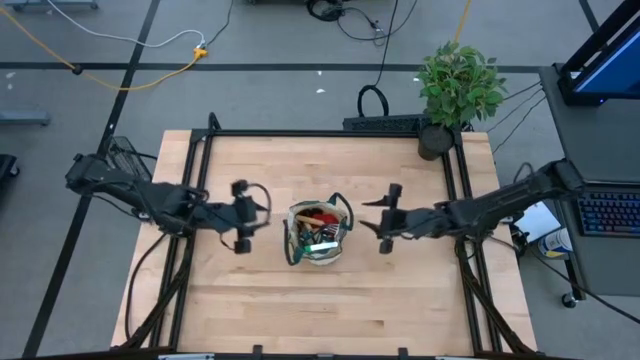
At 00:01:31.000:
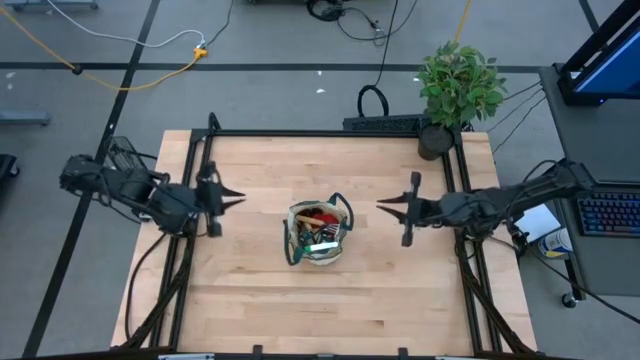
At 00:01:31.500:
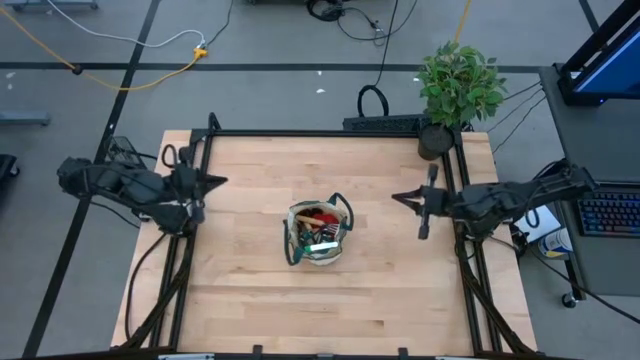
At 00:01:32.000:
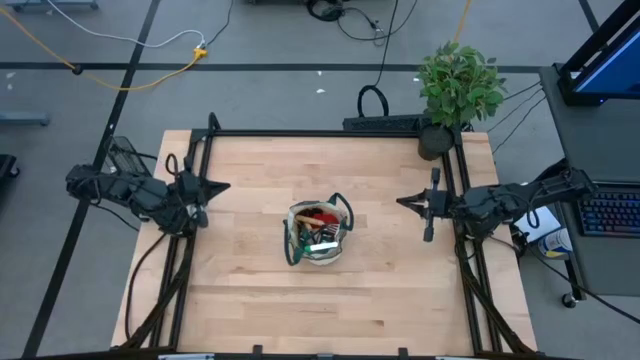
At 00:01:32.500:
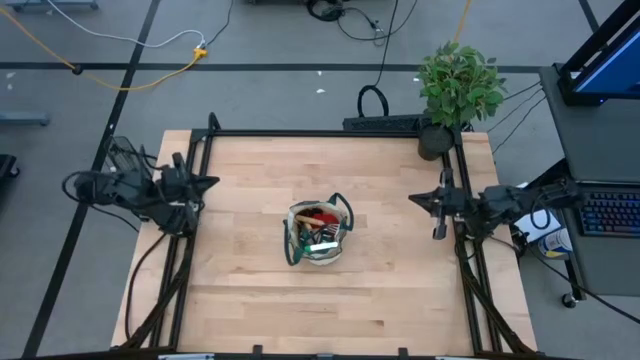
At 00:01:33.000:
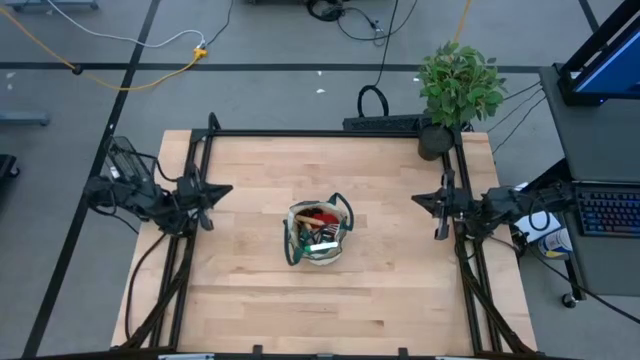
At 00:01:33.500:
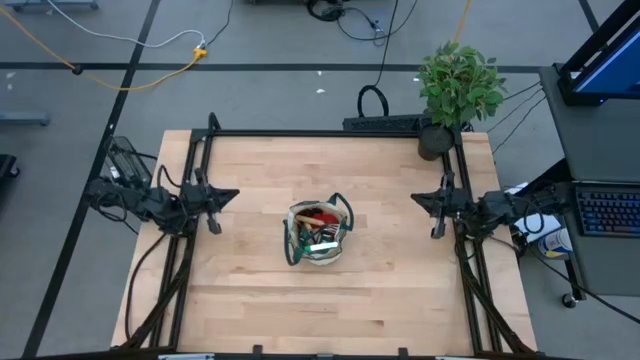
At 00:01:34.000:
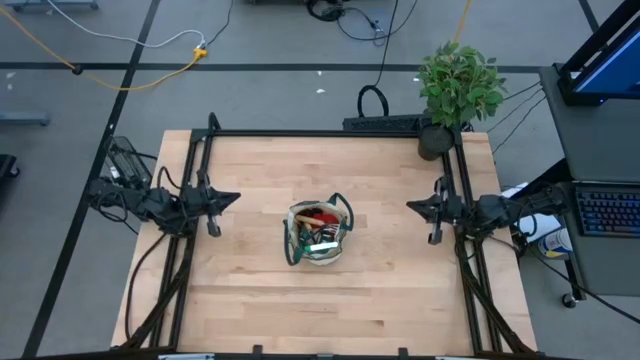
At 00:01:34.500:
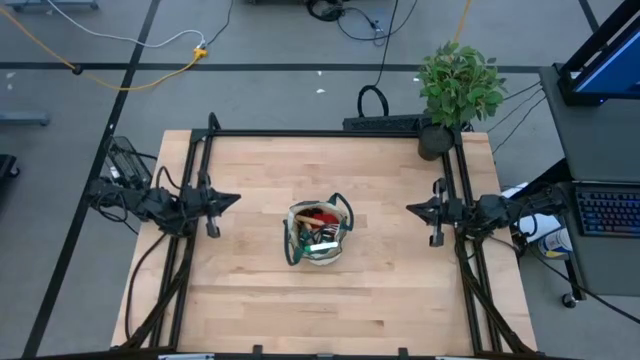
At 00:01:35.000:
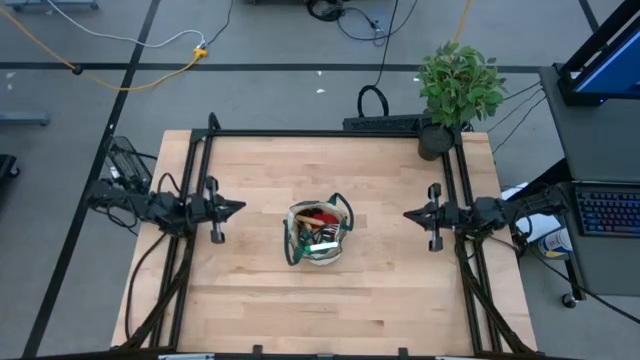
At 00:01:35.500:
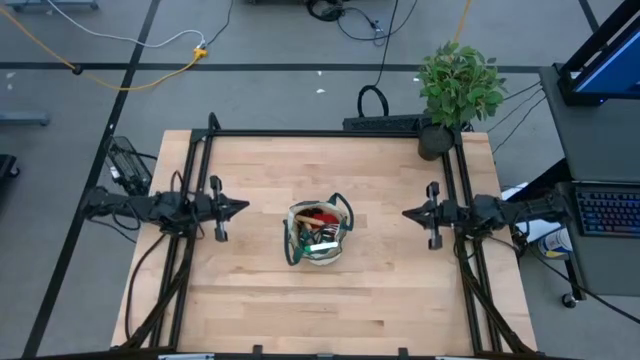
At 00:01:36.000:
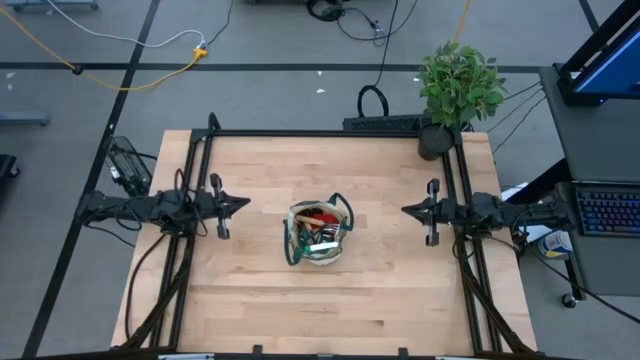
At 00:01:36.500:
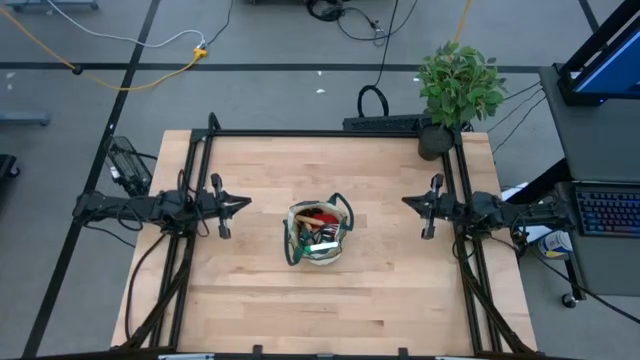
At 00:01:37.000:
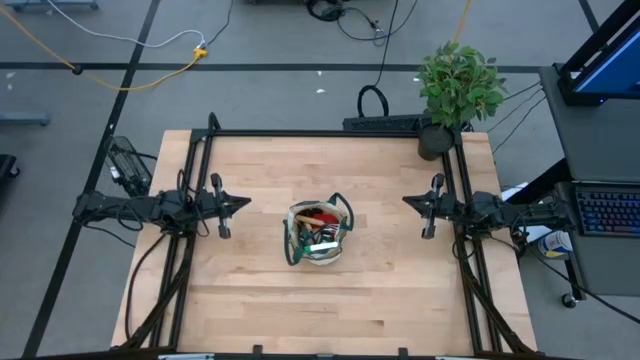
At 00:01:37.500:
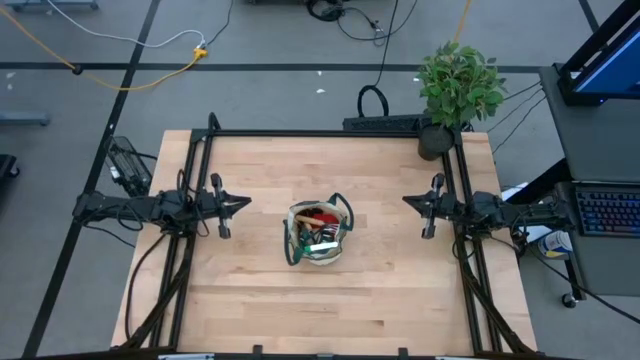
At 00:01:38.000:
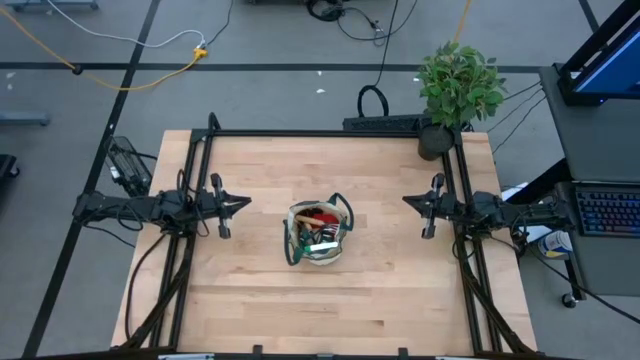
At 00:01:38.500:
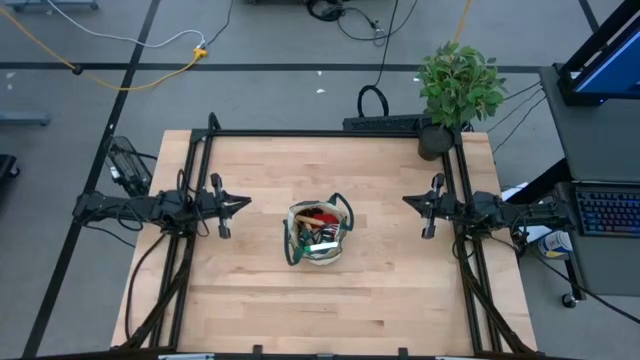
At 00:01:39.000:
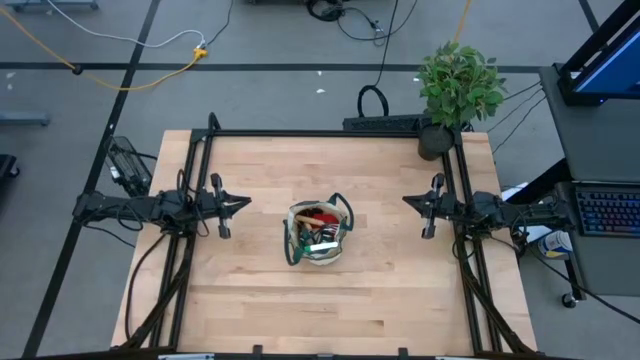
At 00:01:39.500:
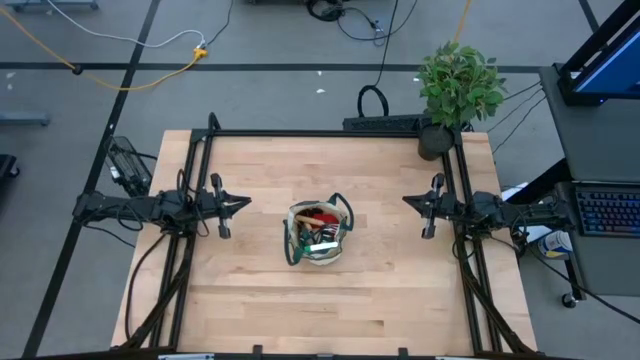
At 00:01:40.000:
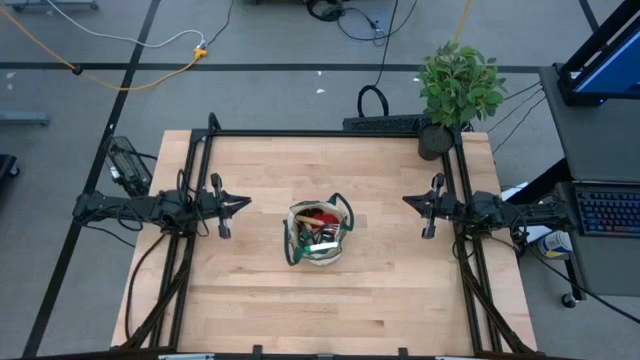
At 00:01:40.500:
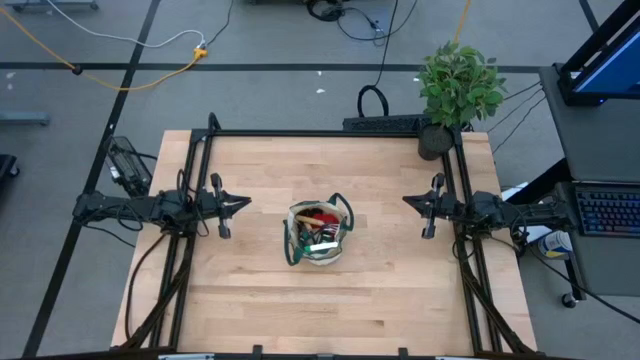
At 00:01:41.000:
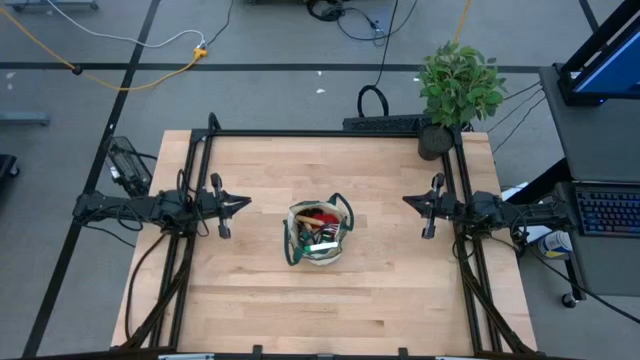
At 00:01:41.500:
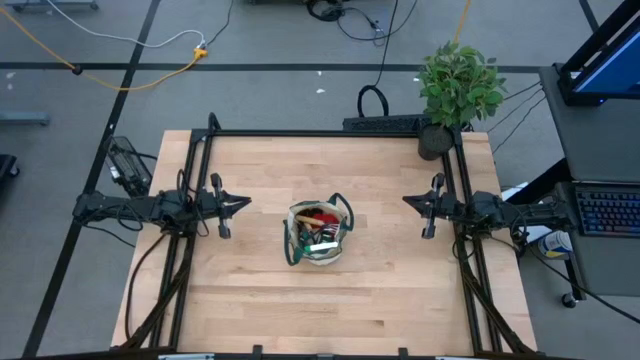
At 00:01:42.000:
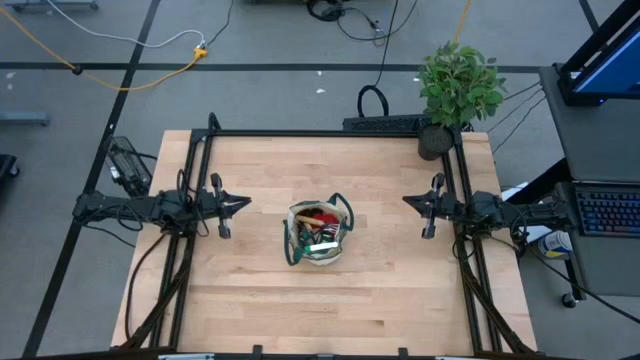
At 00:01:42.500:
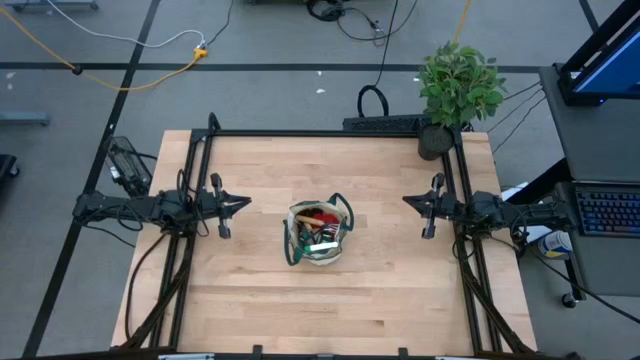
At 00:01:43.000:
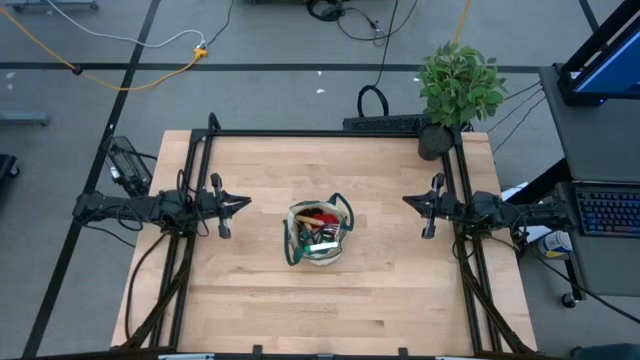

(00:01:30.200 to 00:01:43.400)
Task: Pick & Place Garden tools in Gardening bag
Return to Home Position

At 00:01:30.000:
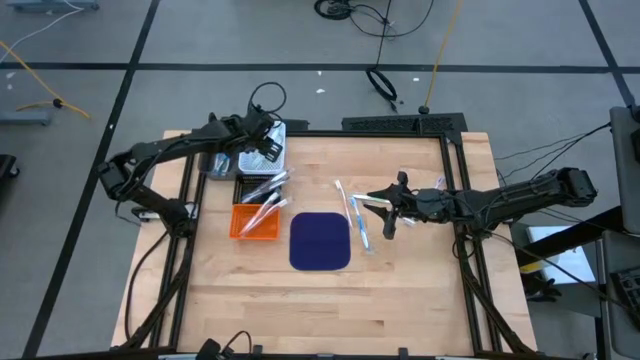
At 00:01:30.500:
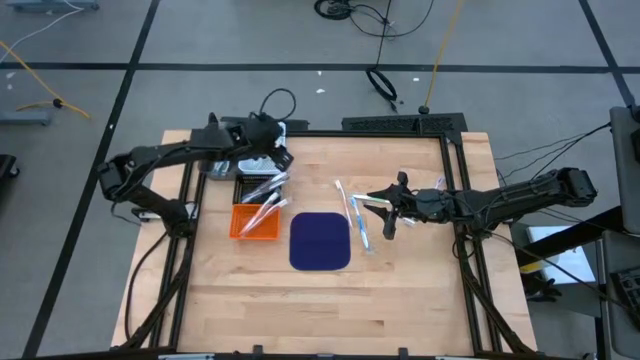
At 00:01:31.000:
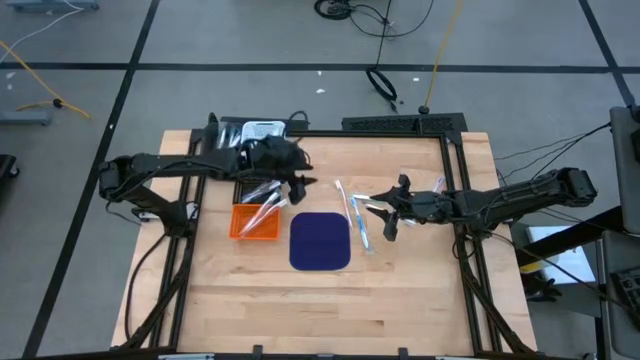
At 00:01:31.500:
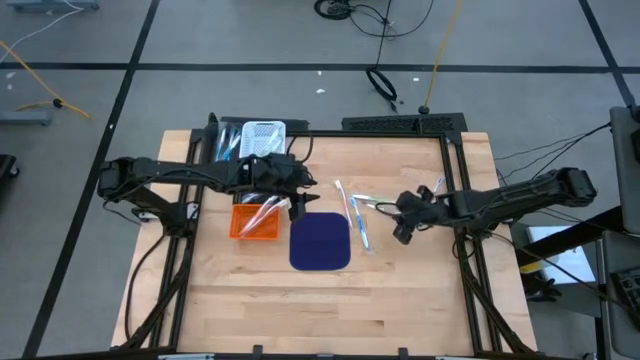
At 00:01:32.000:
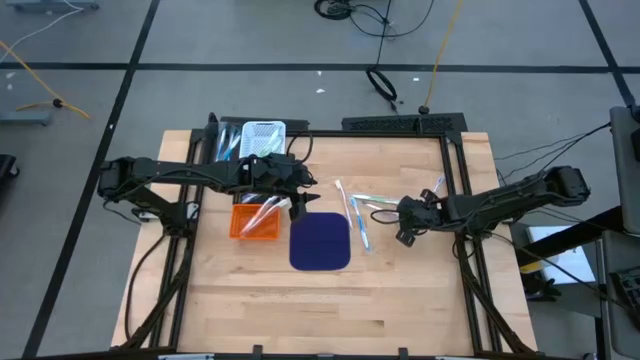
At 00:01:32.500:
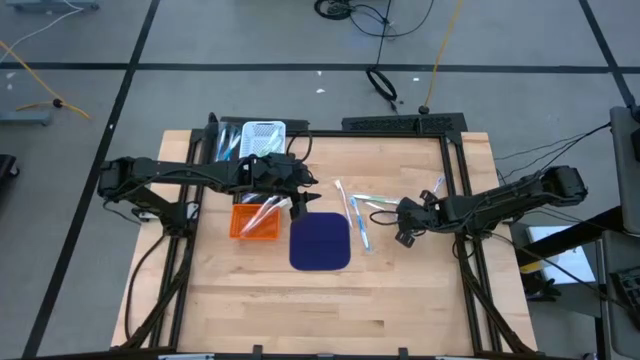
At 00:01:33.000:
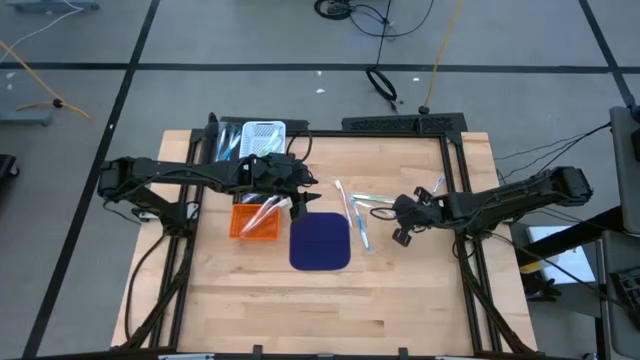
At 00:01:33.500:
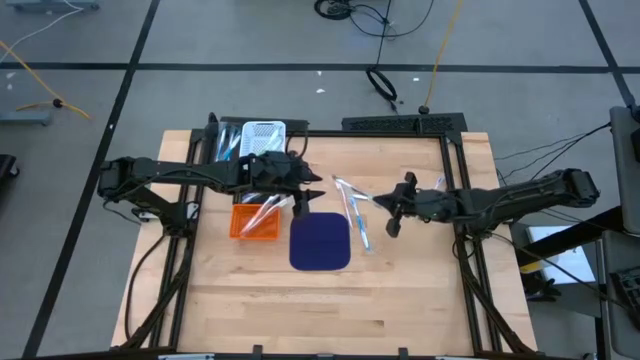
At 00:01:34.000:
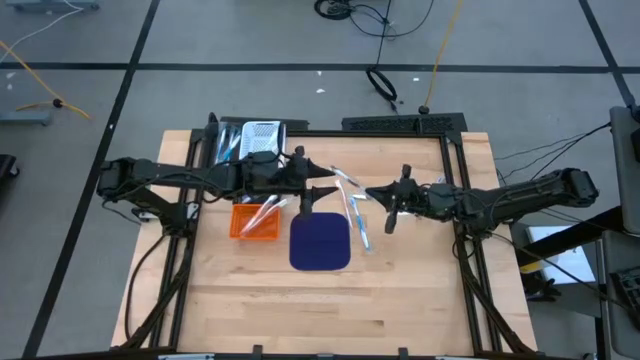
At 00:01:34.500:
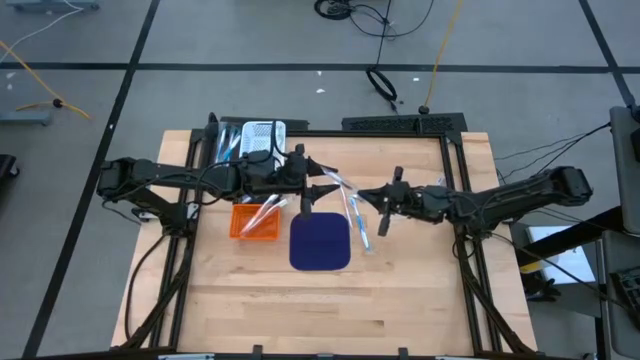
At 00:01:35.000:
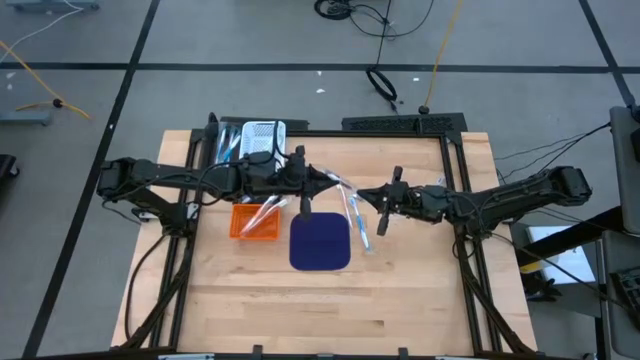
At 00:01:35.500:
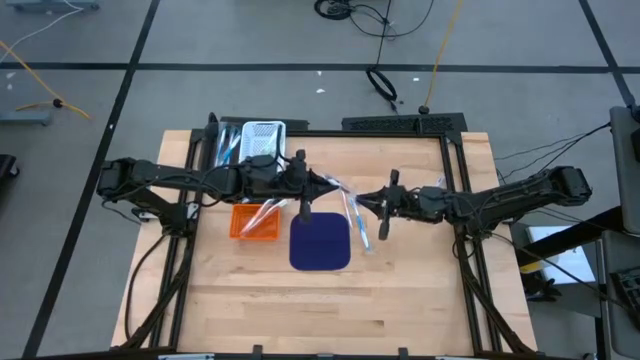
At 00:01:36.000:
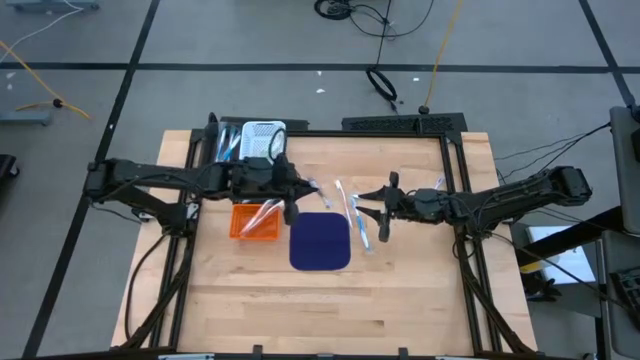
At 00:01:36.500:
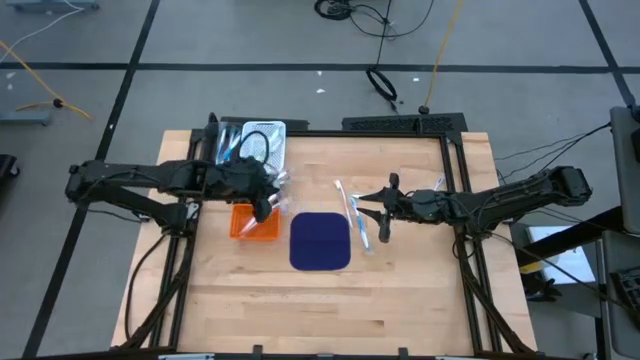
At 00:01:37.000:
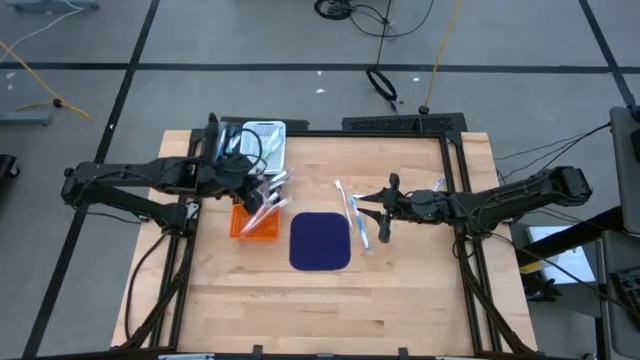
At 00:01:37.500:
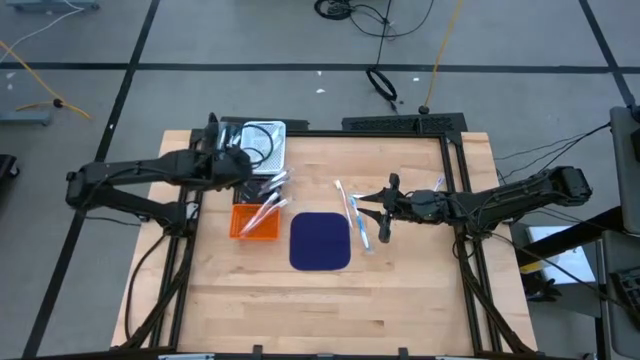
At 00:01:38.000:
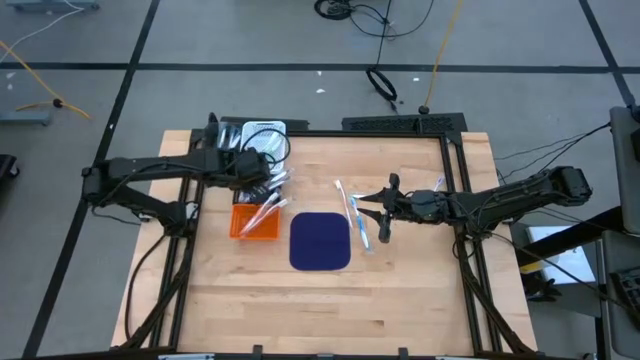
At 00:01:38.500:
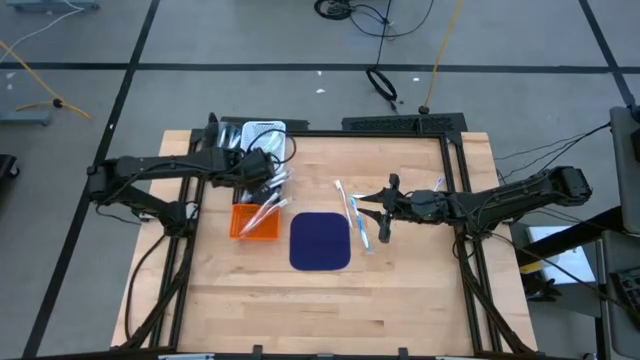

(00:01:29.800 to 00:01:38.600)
Task: Pick & Place Toothbrushes
Put the violet toothbrush into the black bin
